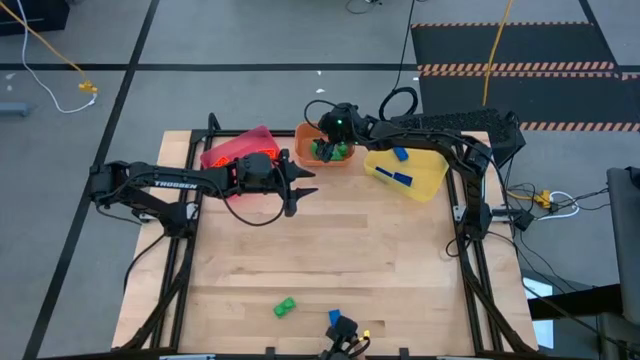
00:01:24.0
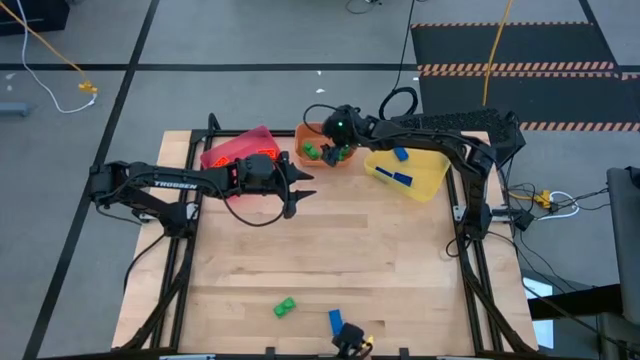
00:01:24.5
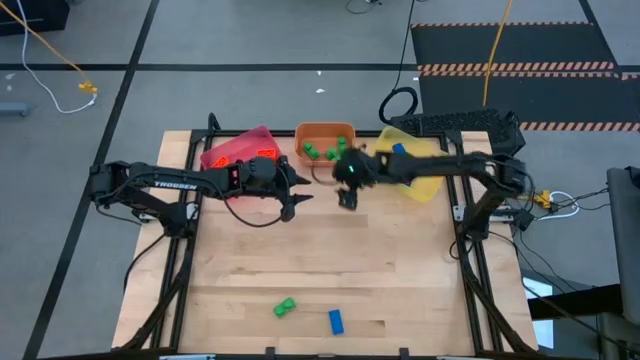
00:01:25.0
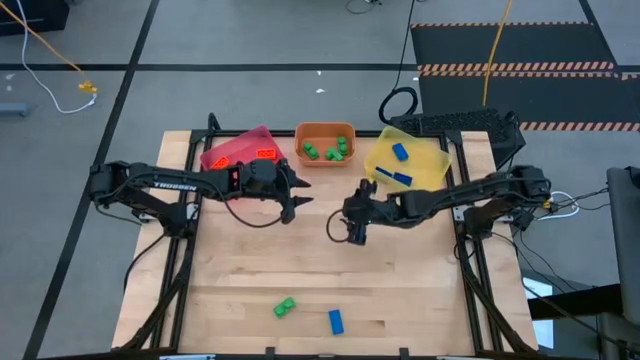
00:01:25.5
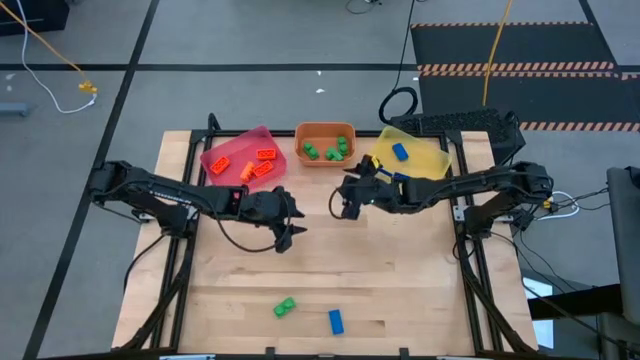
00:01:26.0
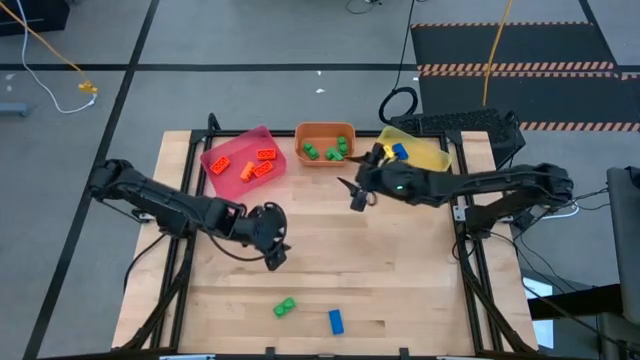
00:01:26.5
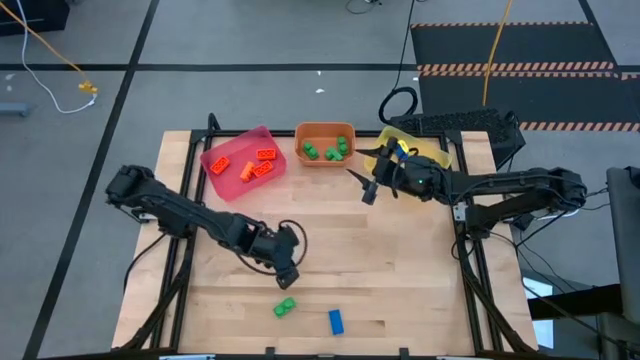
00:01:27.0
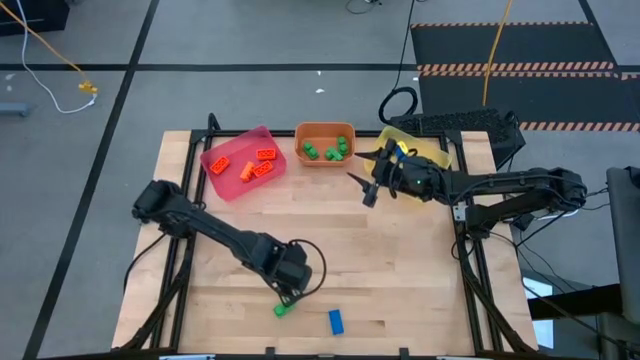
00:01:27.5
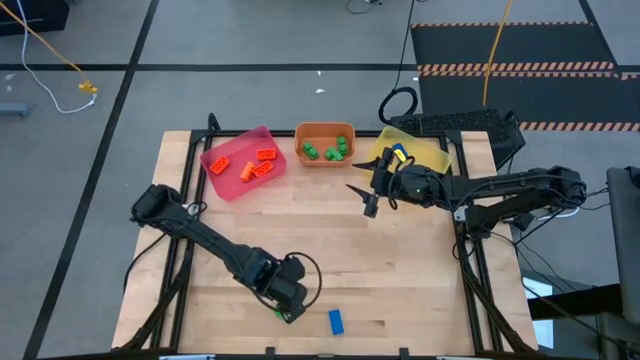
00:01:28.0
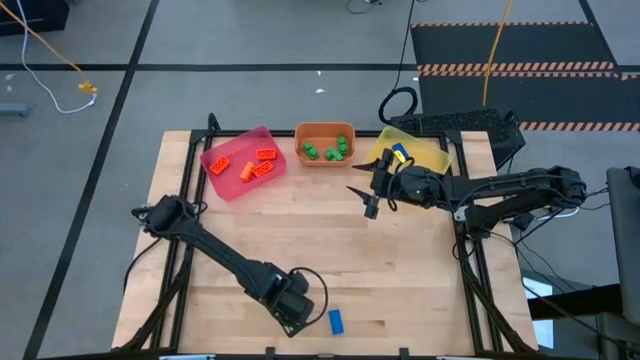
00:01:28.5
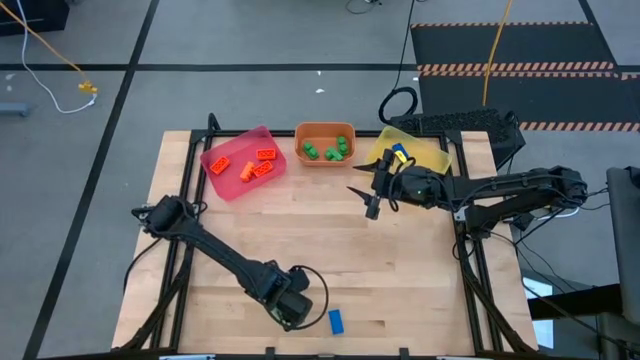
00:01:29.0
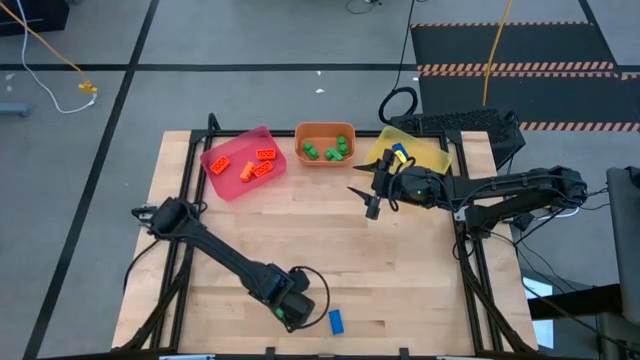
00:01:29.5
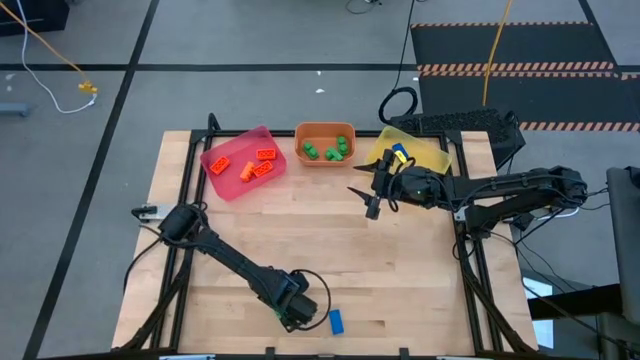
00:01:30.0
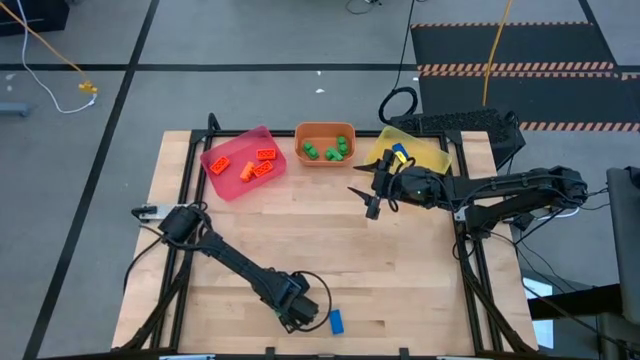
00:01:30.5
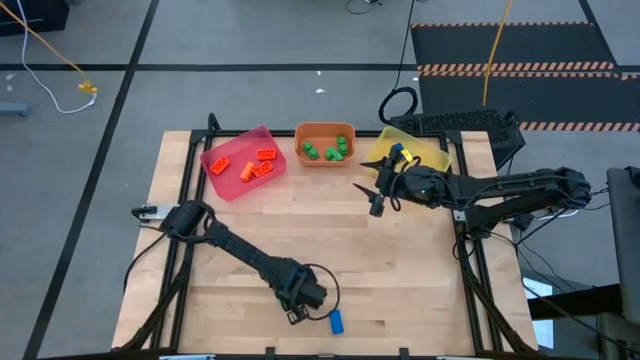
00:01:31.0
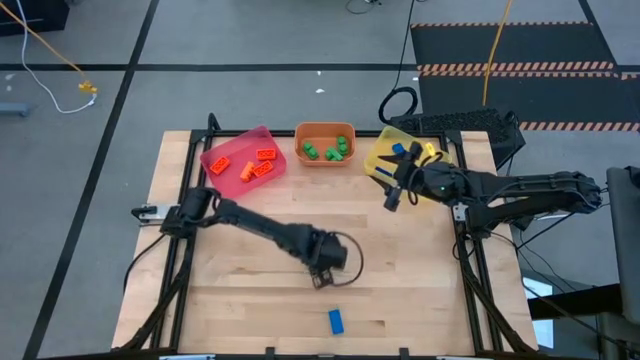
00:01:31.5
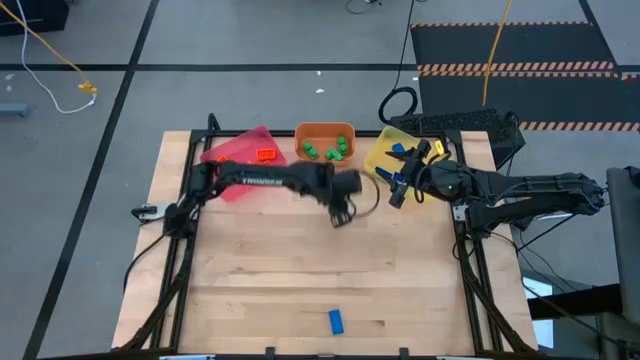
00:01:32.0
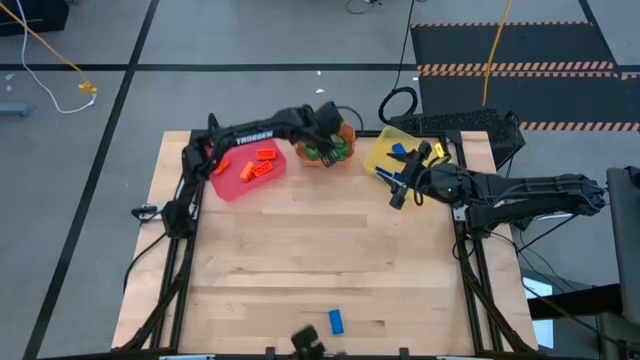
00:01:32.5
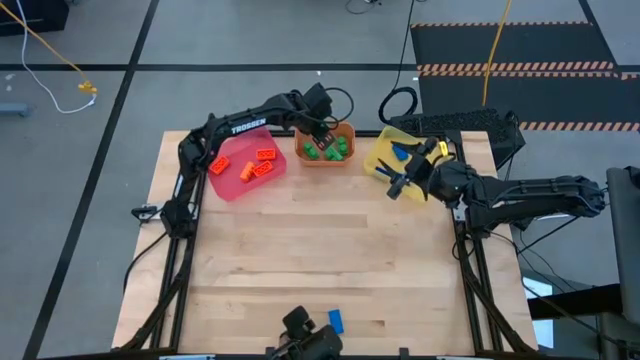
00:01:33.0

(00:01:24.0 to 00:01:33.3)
Task: Sort & place blocks by color
Put the green game piece into the orange bin

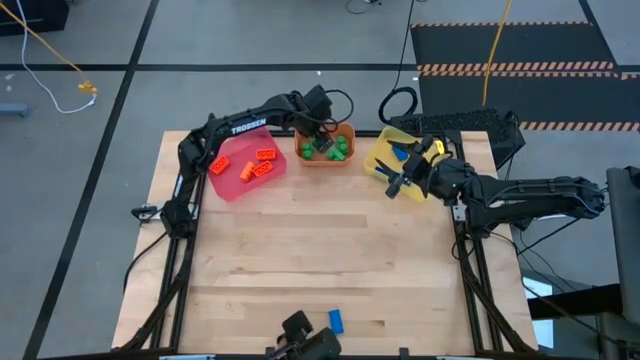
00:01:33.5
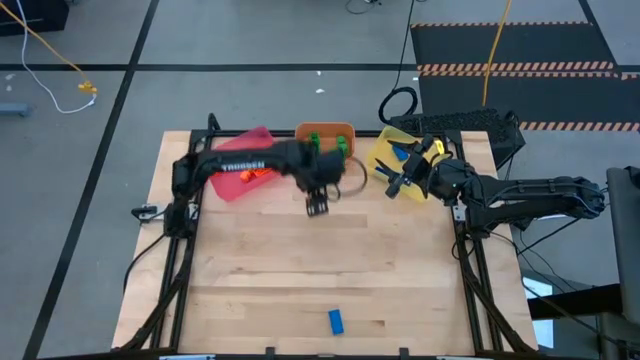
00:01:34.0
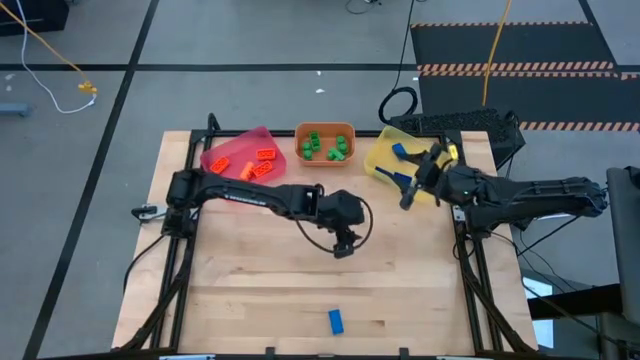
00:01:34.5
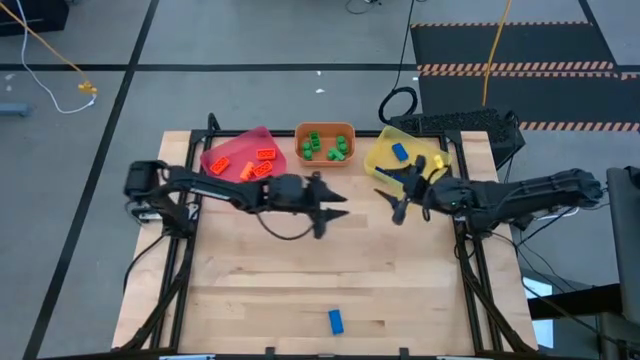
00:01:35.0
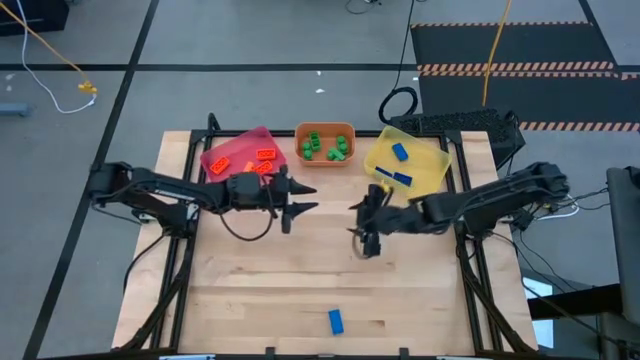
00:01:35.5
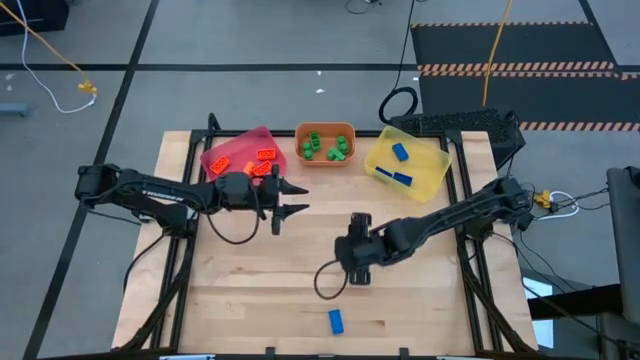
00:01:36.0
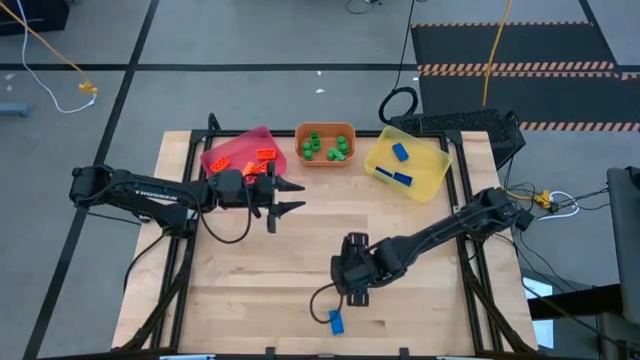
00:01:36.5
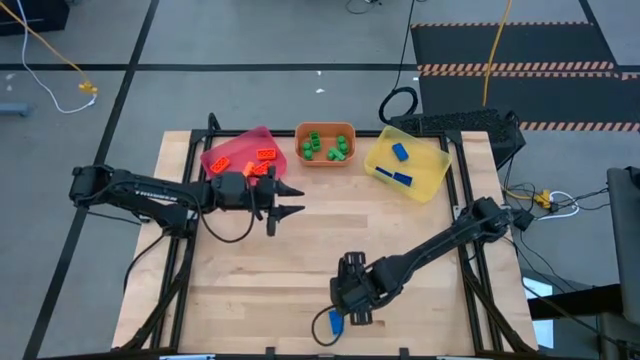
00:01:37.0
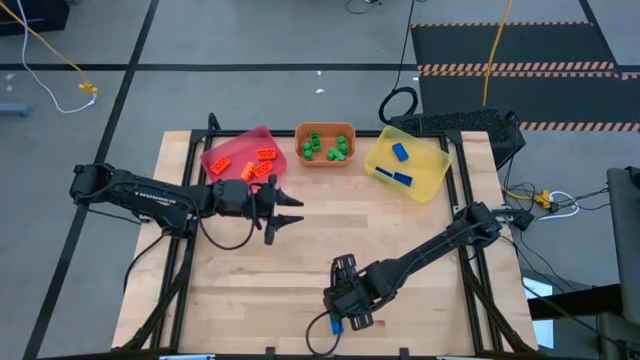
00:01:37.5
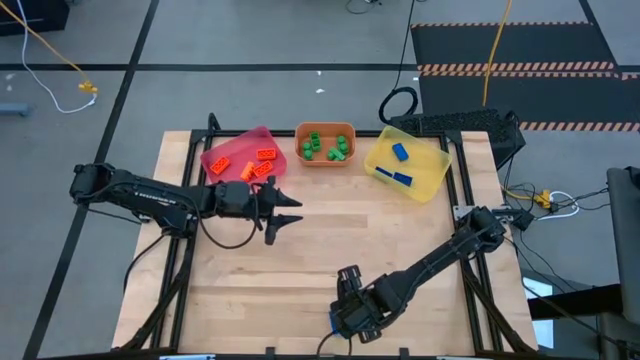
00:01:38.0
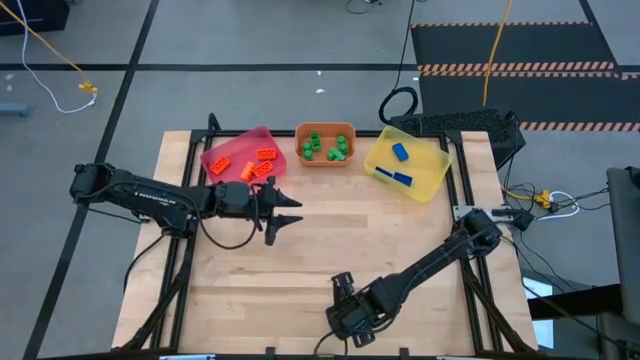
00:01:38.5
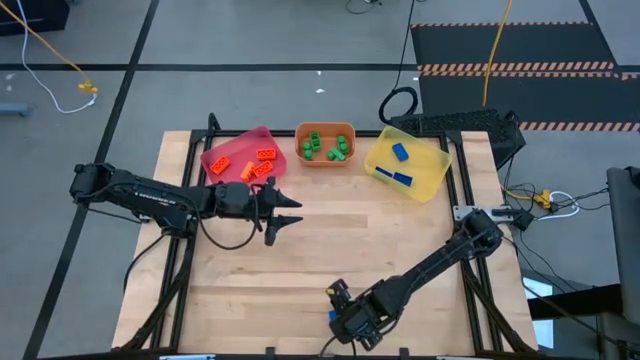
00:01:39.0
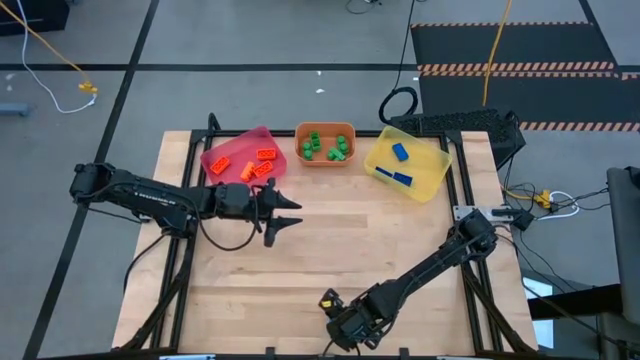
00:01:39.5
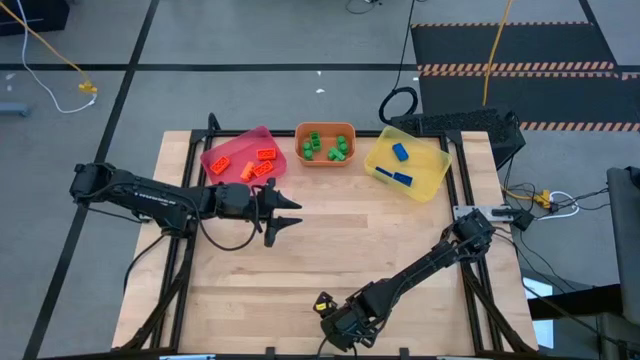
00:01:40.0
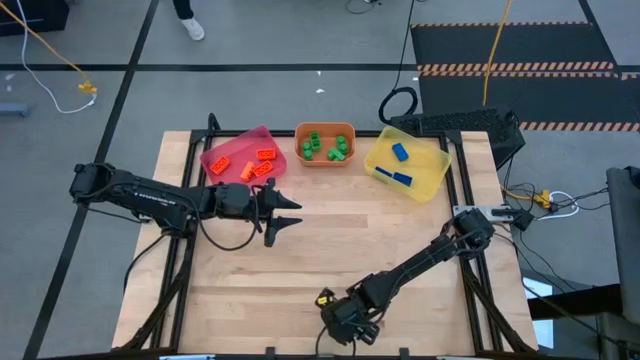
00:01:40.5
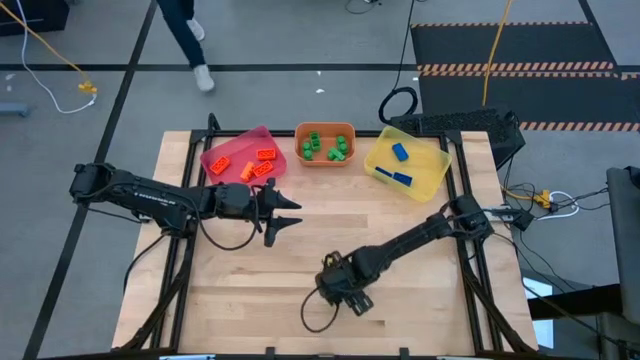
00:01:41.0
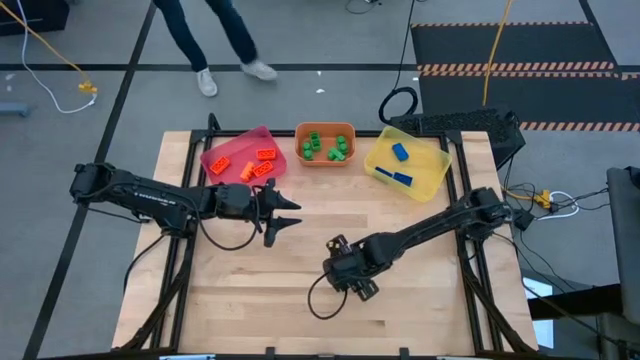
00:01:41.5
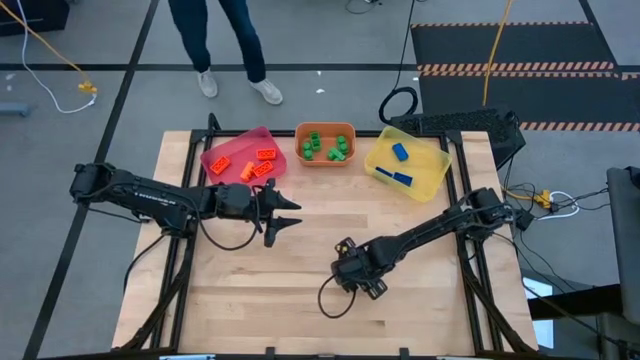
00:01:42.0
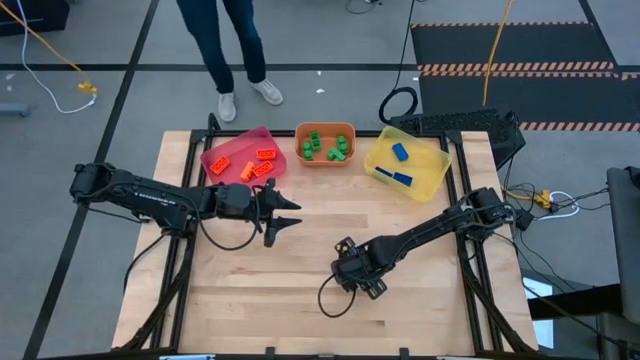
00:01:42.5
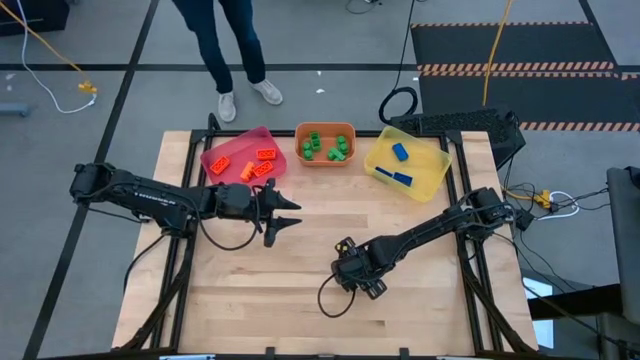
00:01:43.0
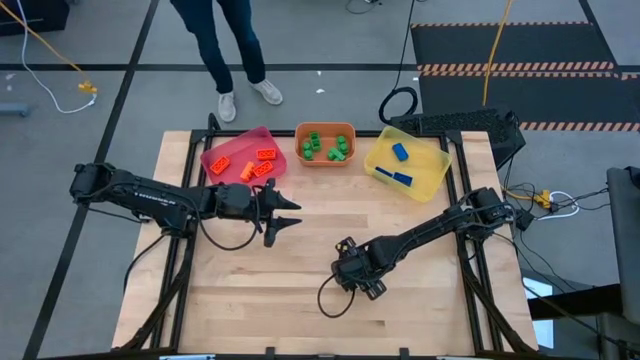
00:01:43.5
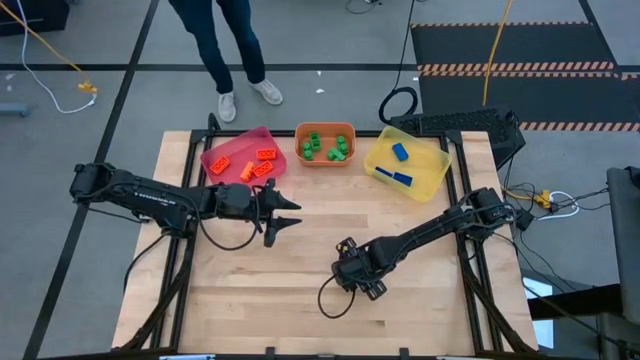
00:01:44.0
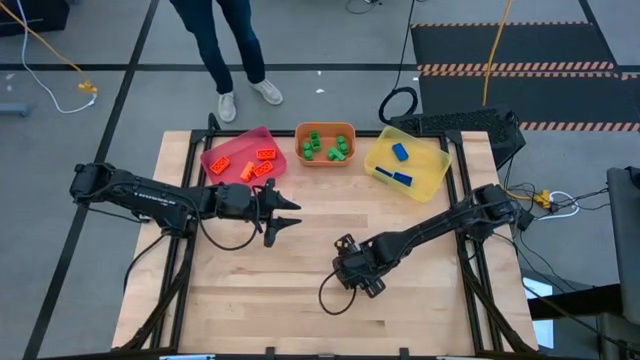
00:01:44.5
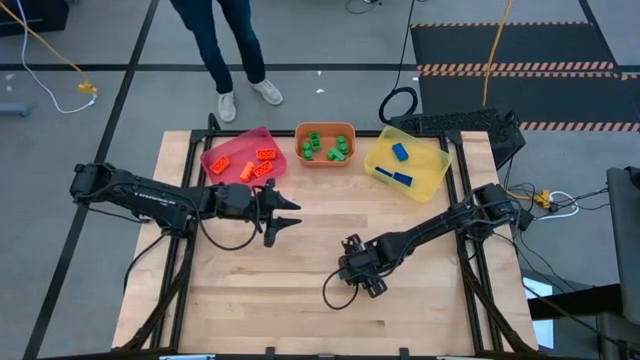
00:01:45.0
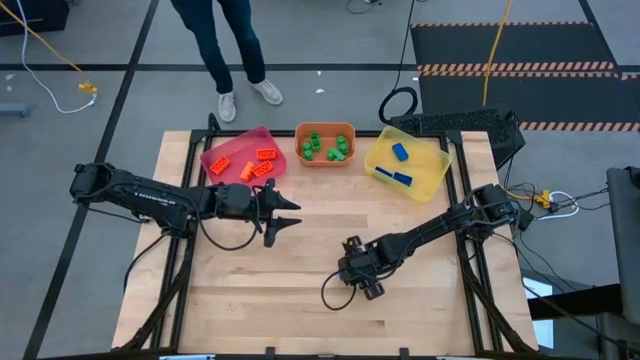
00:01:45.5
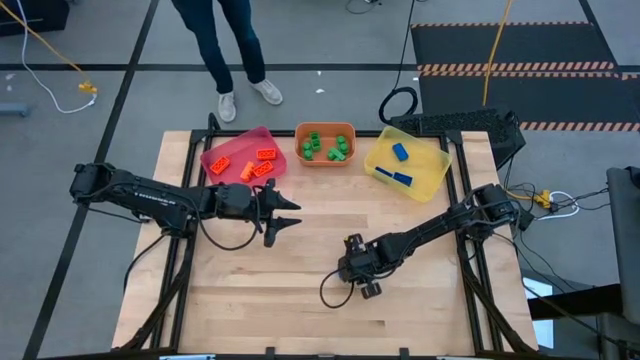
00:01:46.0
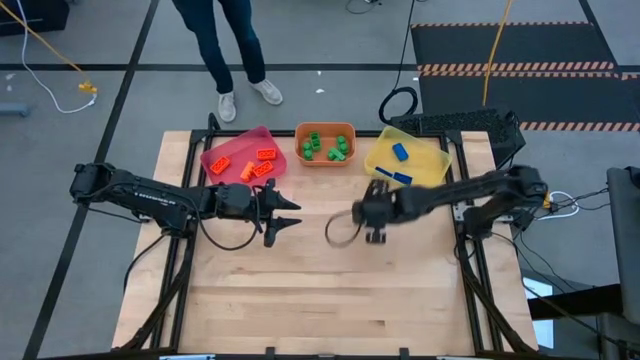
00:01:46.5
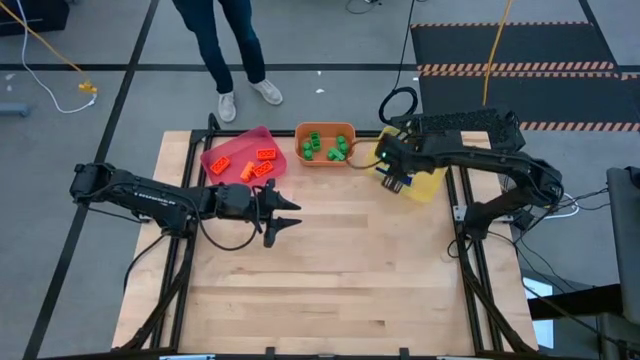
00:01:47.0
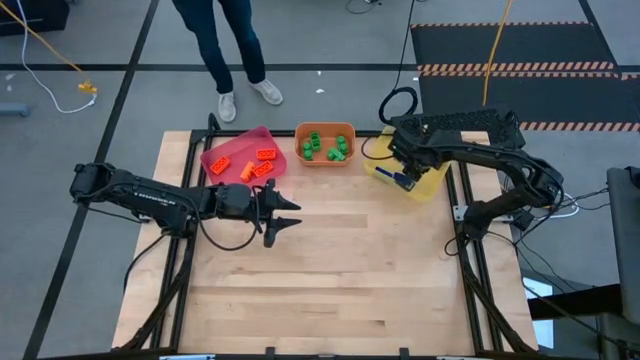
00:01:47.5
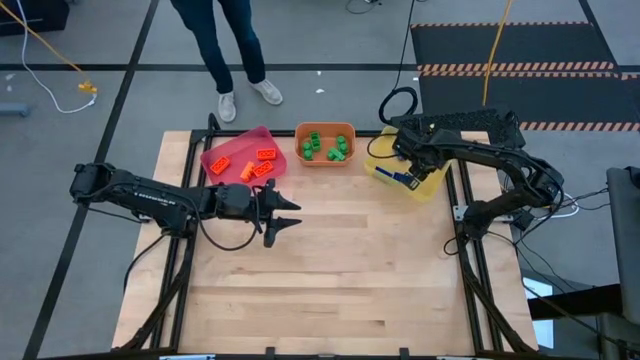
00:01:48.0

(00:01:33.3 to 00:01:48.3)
Put the blue game piece into the yellow bin
